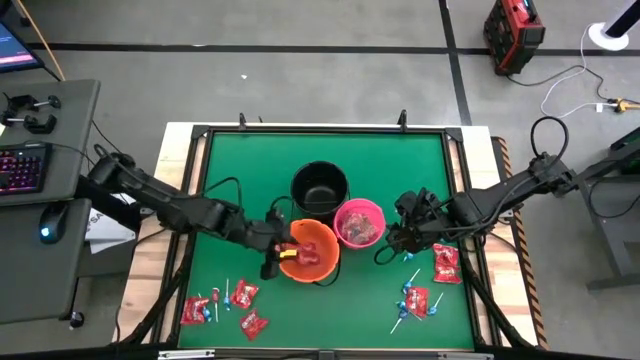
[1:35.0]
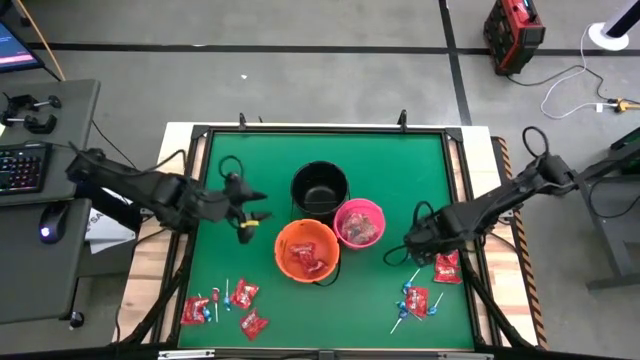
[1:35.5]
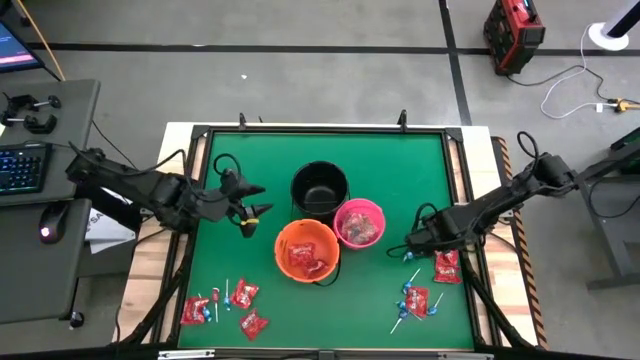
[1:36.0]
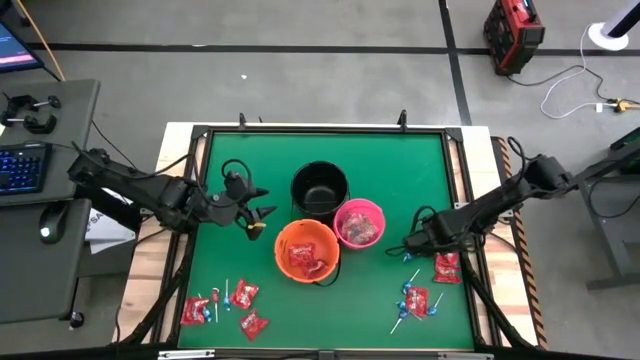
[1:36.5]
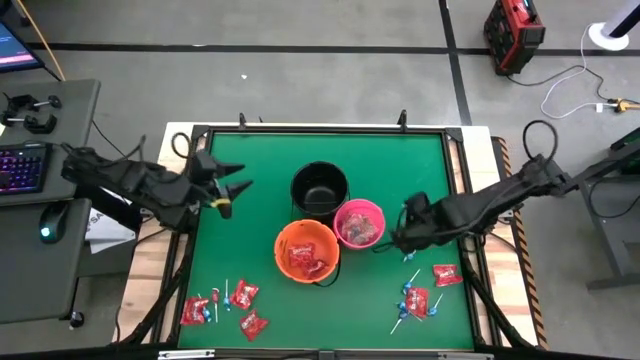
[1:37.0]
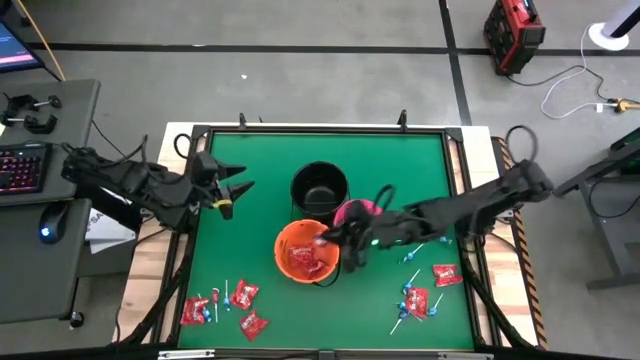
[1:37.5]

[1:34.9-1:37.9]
Task: Sort candy by brand, put in halloween buckets
Put the red candy into the orange bucket

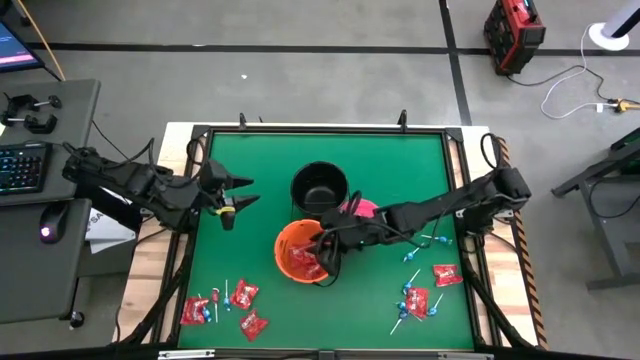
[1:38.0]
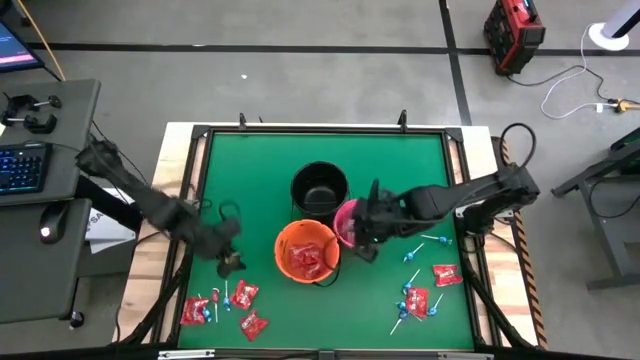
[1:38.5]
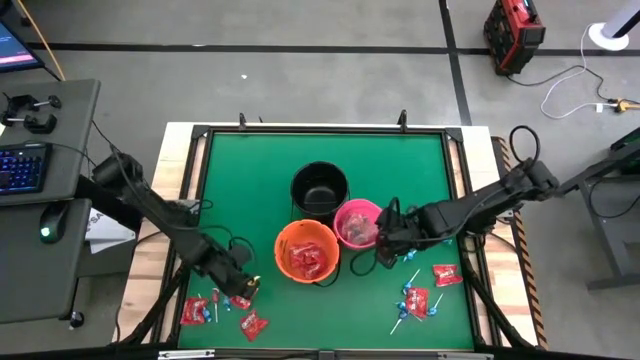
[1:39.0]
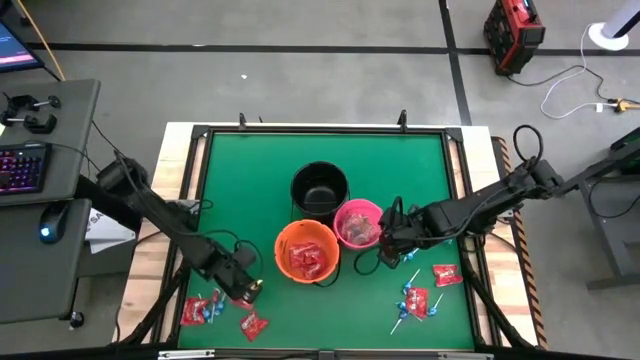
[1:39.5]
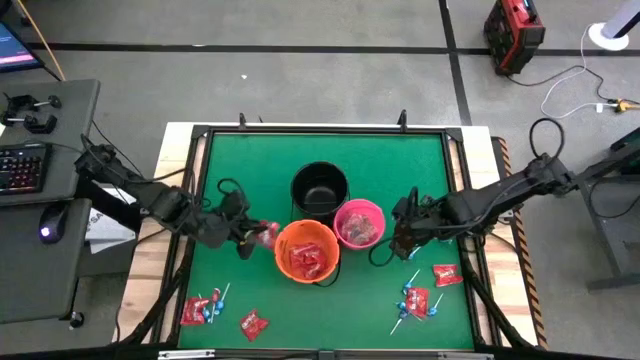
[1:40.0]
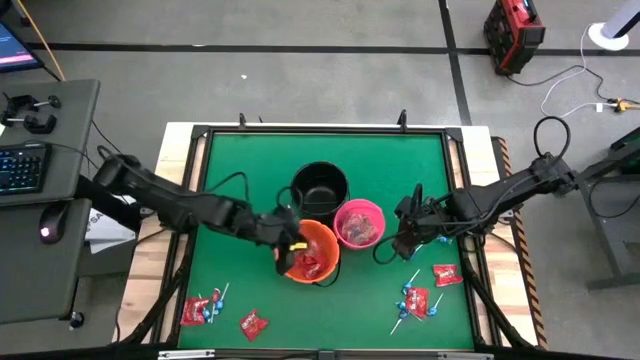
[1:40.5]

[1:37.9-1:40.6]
Put the red candy into the orange bucket

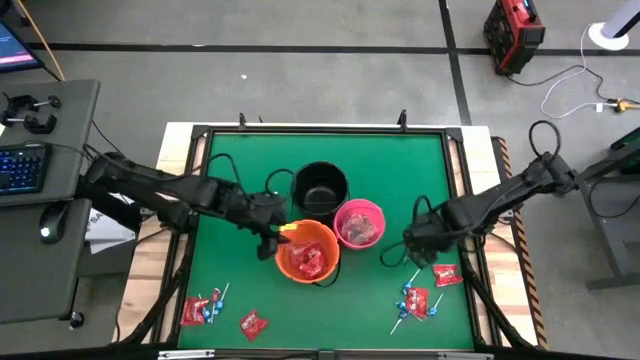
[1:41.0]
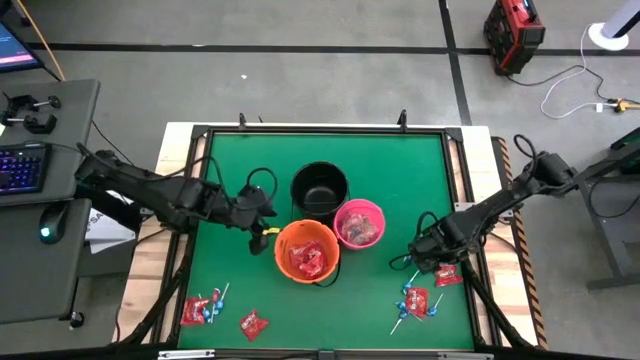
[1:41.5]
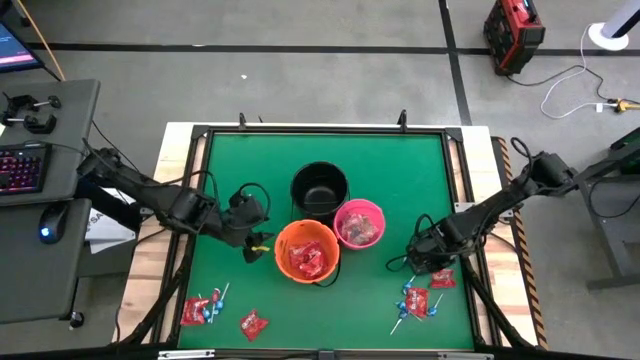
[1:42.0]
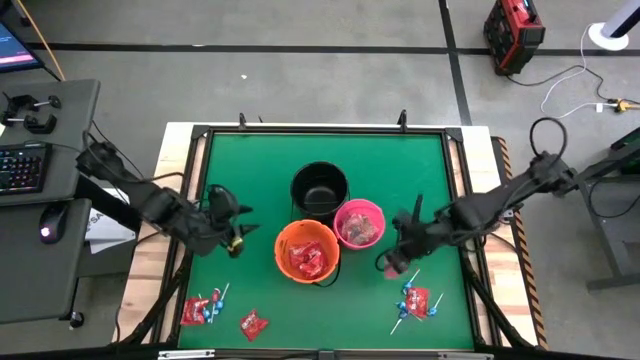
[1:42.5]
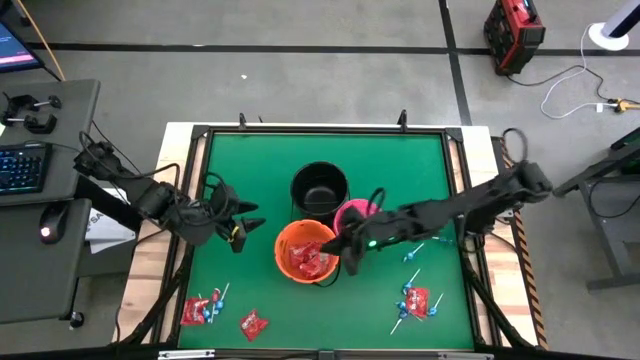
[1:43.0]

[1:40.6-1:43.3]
Put the red candy into the orange bucket

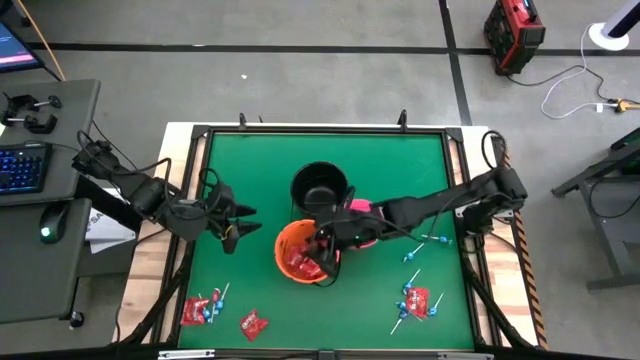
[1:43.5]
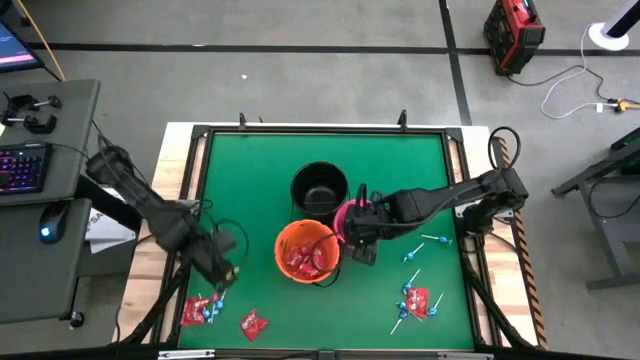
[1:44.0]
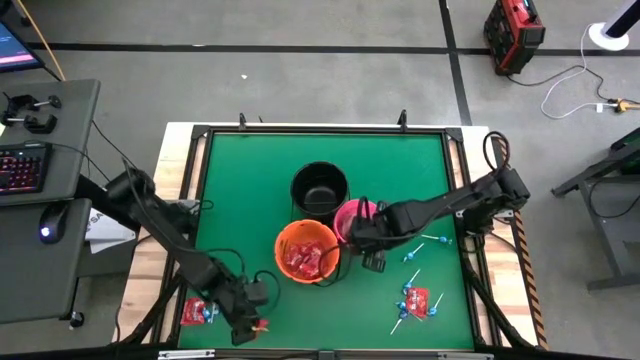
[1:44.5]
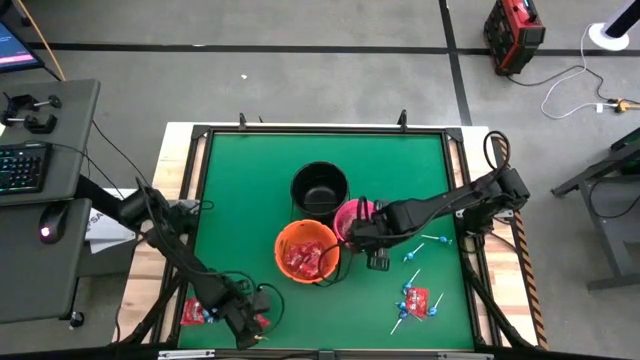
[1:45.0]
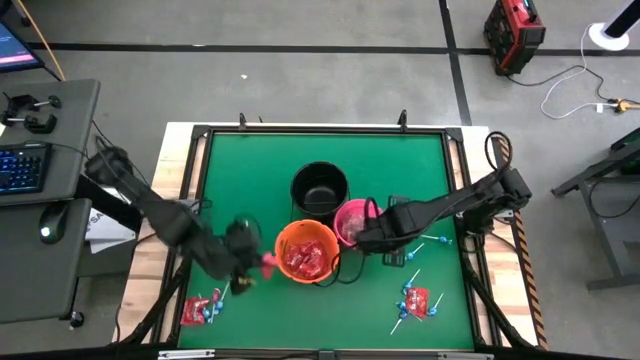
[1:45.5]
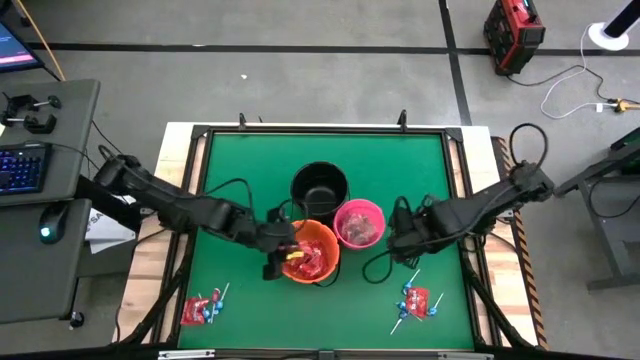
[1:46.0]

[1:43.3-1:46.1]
Put the red candy into the orange bucket

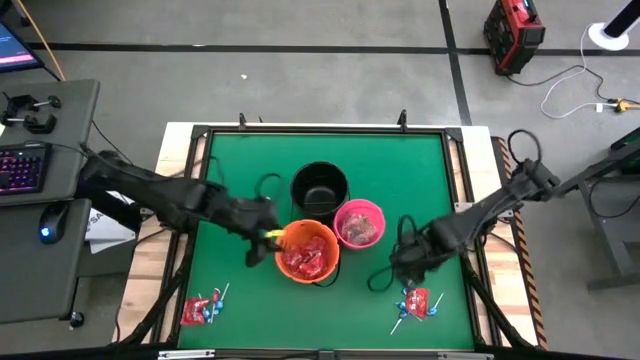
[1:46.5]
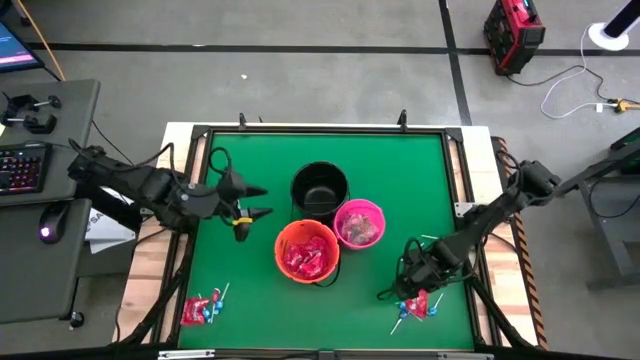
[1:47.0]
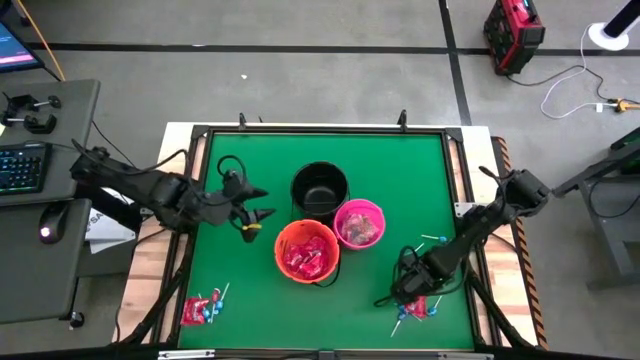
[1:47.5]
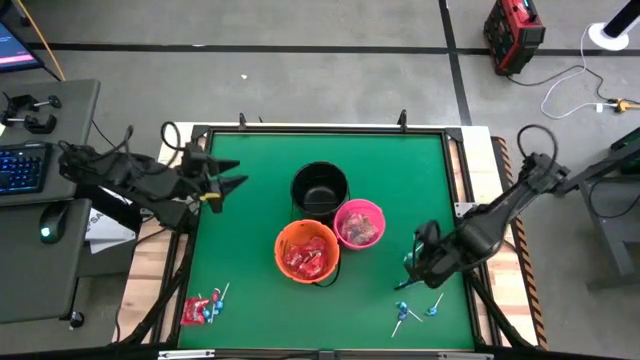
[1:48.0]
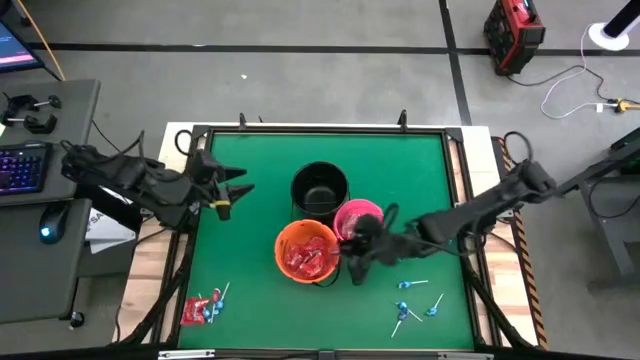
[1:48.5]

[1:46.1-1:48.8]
Put the red candy into the orange bucket

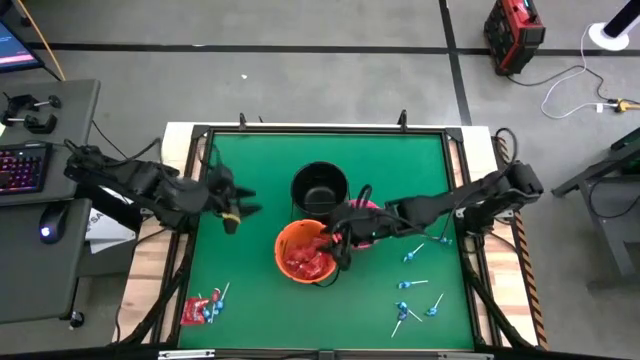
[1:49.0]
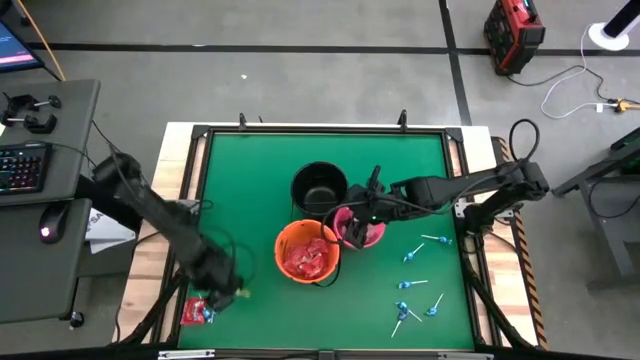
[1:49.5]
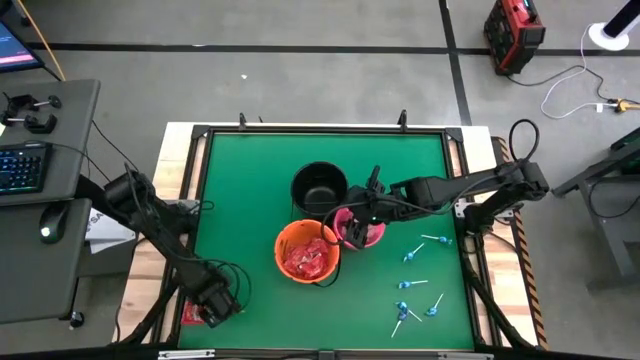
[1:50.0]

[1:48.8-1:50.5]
Put the red candy into the orange bucket

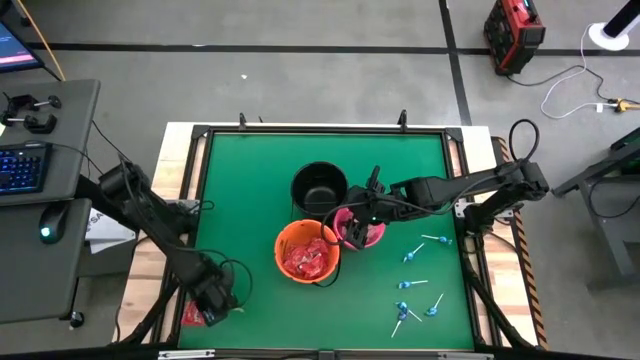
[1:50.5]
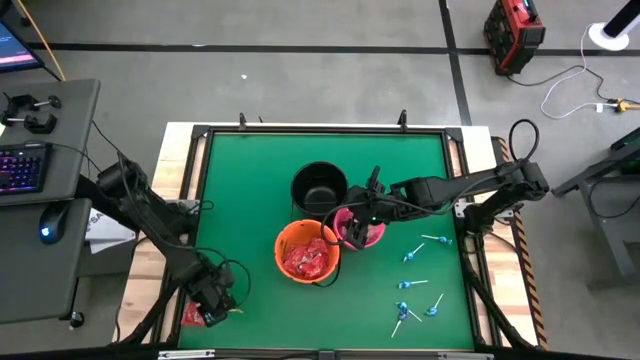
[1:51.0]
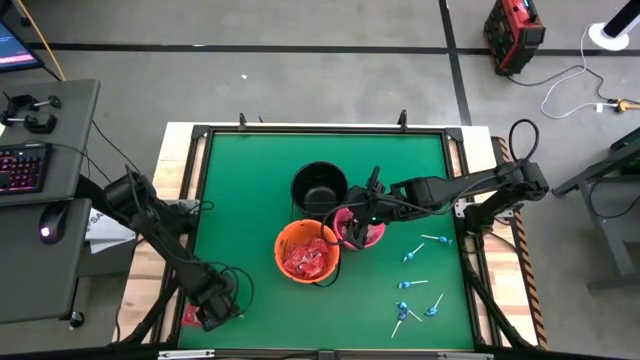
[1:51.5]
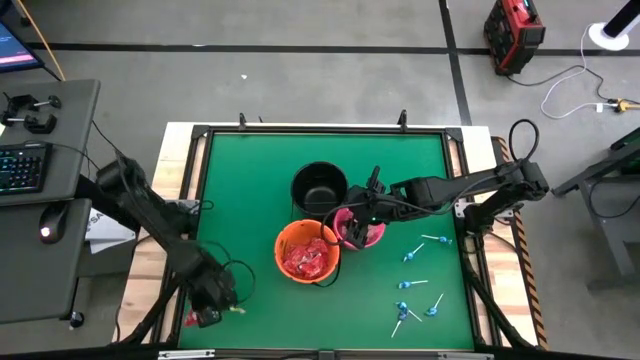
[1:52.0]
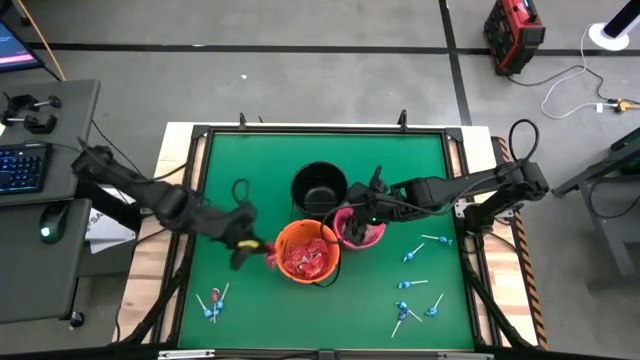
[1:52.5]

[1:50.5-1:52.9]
Put the red candy into the orange bucket

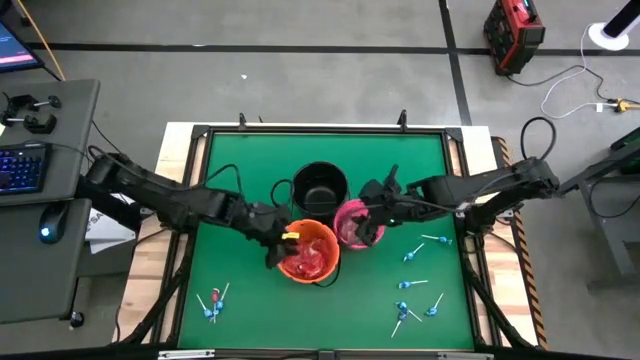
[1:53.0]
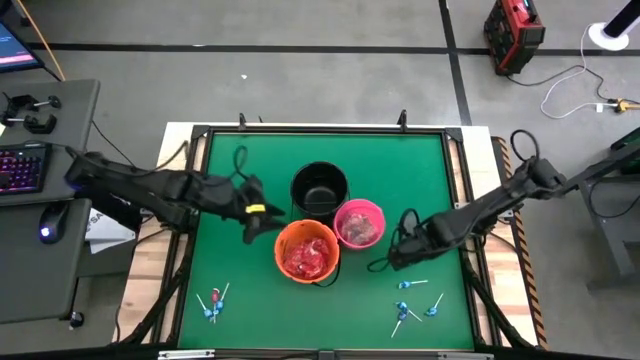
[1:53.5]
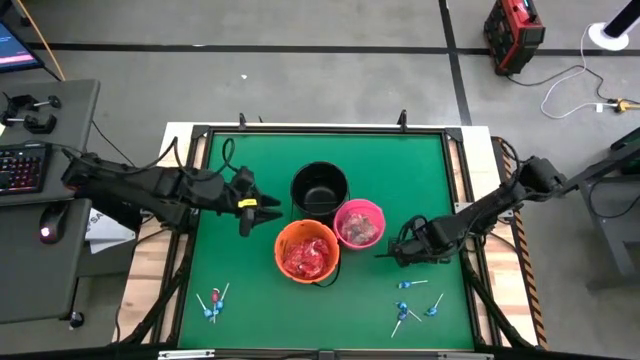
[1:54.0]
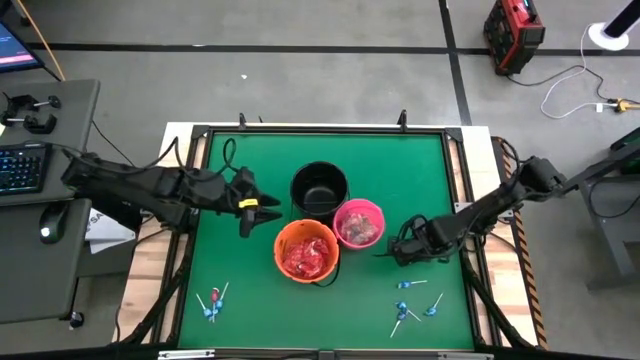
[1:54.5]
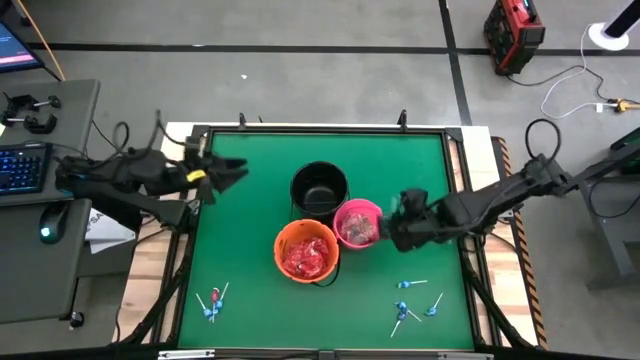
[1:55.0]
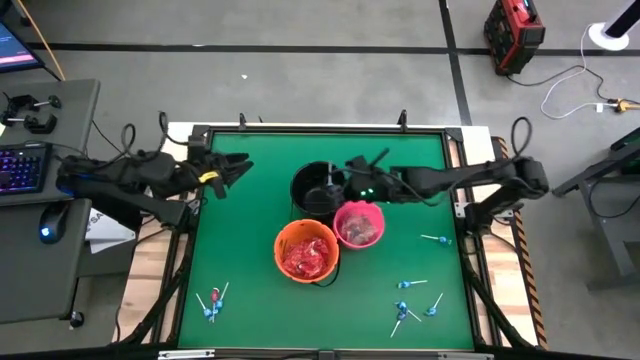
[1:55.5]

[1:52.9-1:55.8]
Put the blue lollipop into the black bucket
